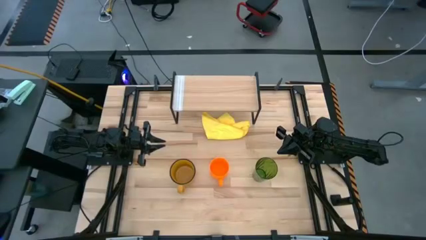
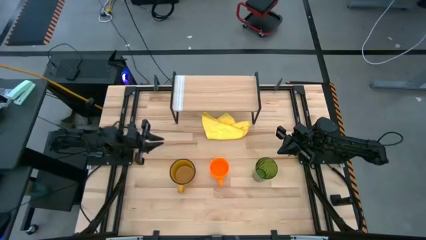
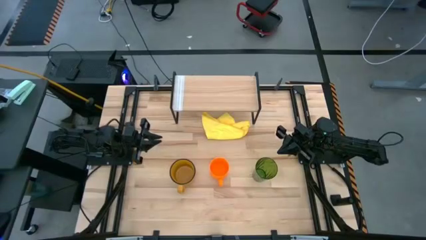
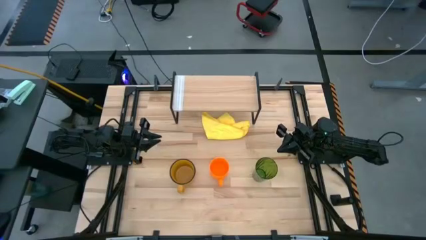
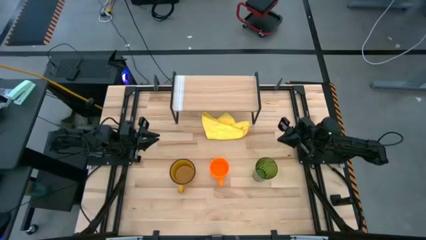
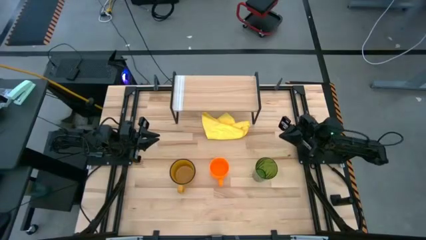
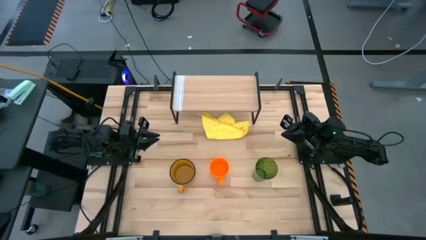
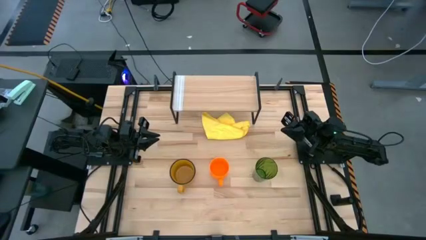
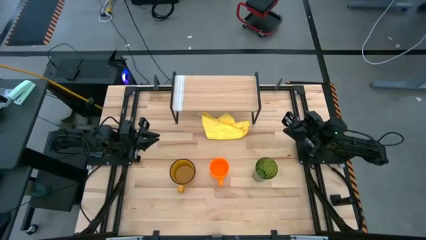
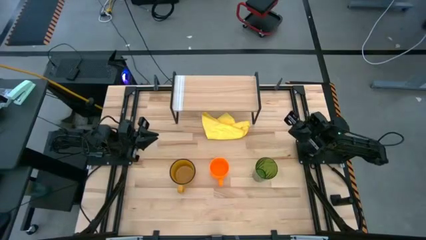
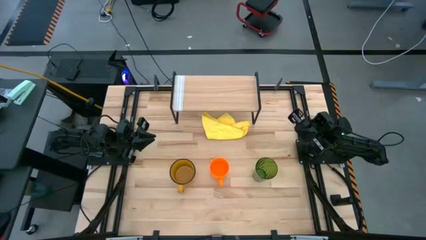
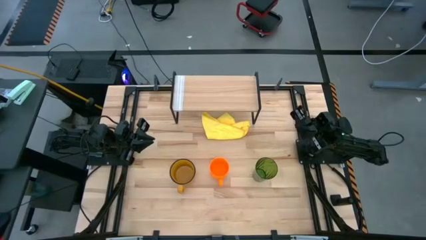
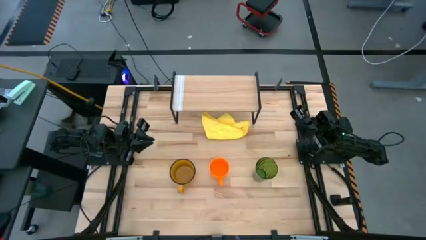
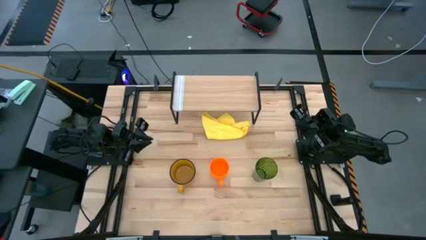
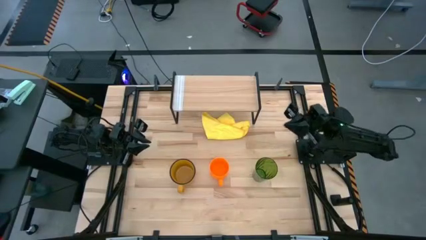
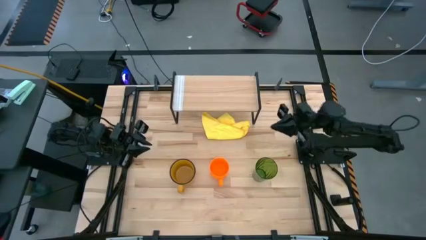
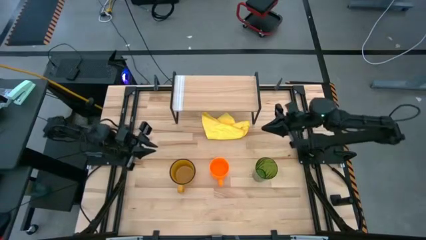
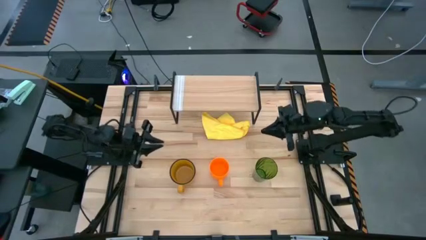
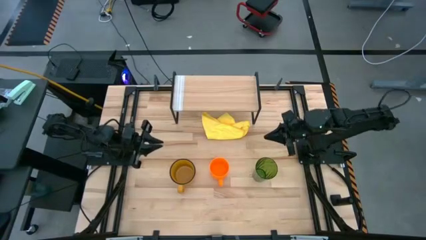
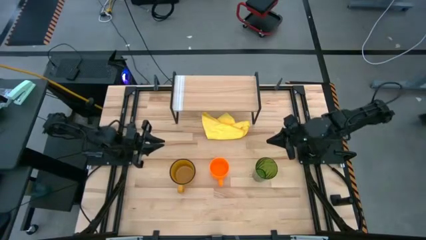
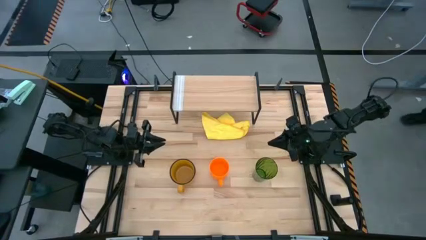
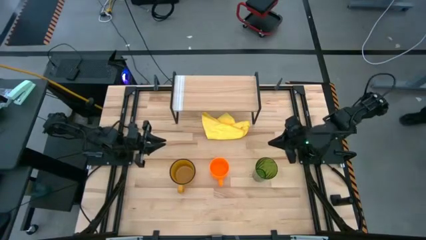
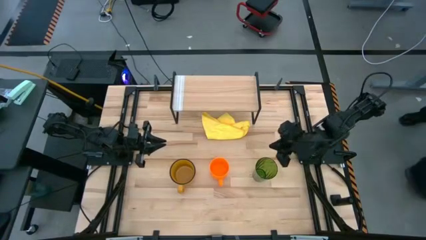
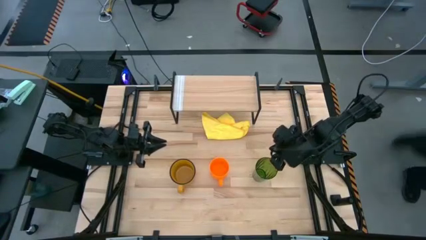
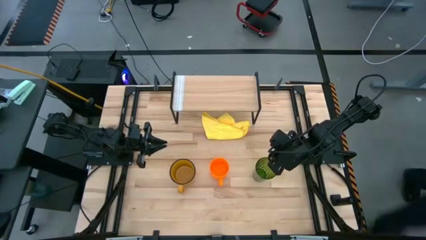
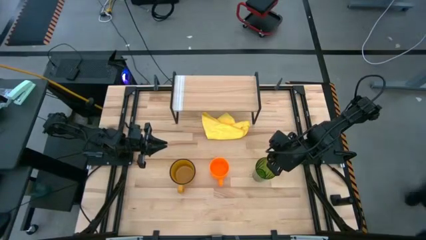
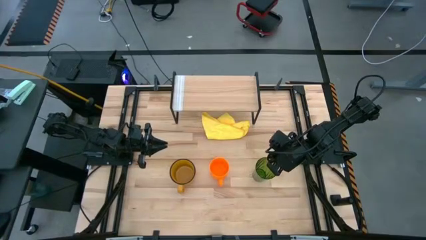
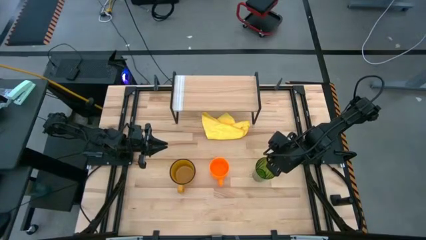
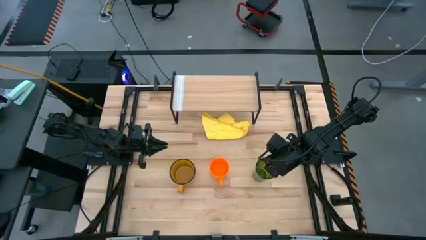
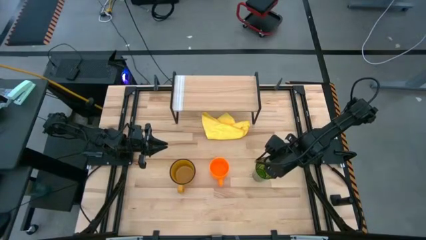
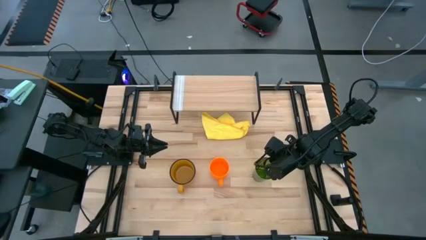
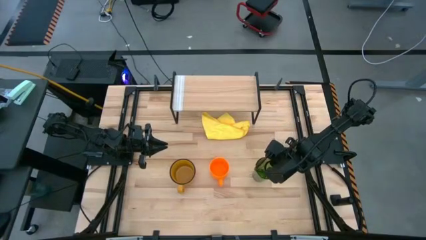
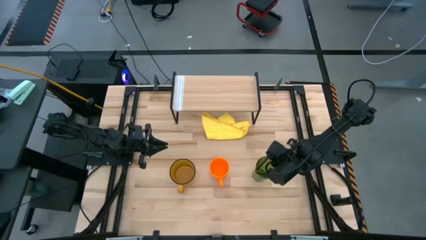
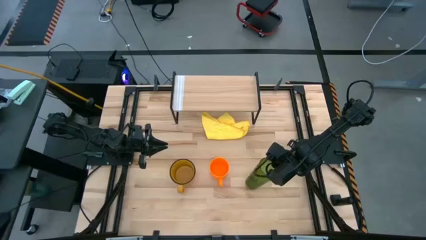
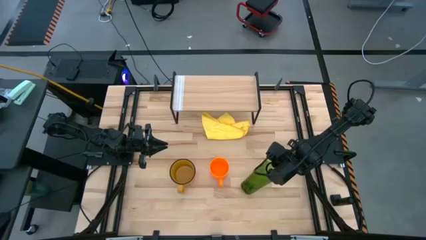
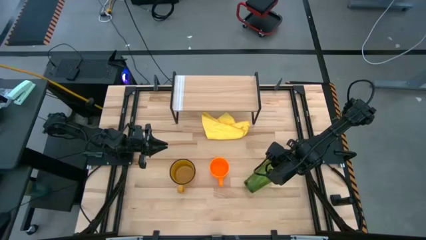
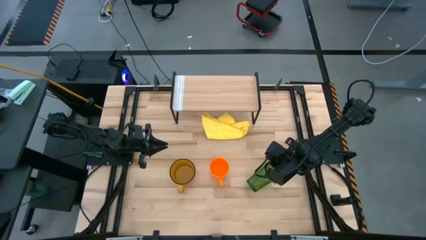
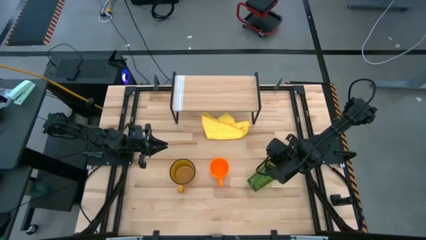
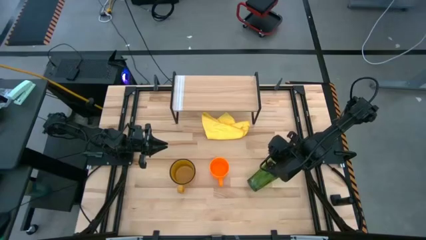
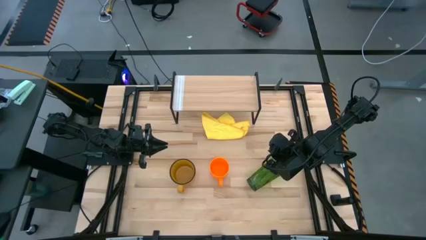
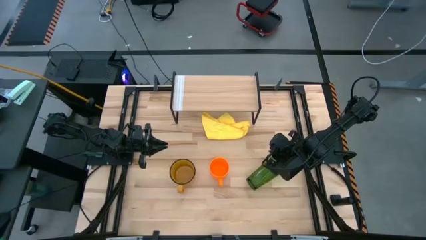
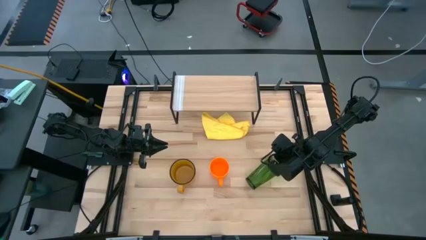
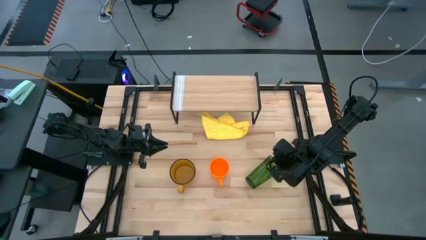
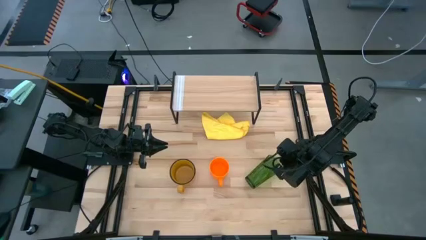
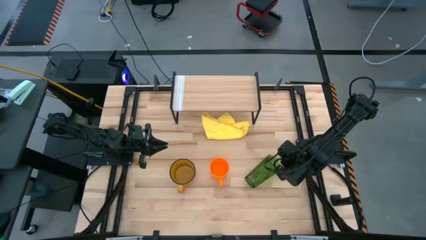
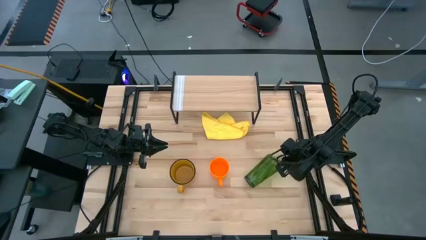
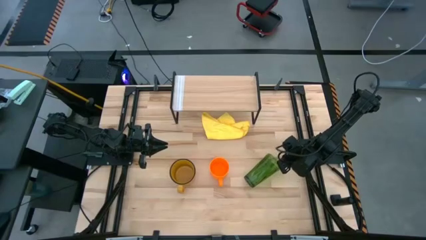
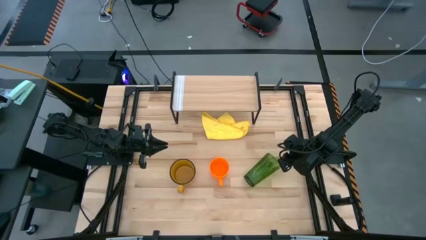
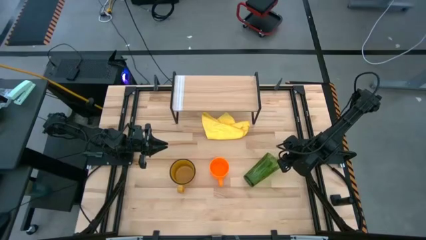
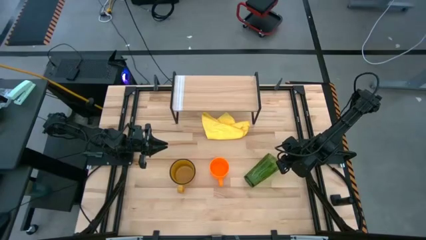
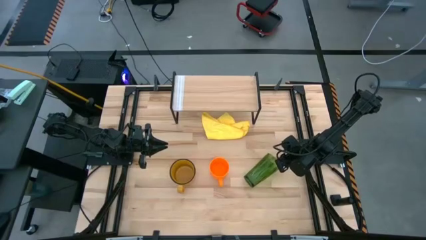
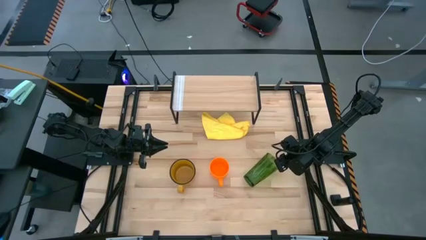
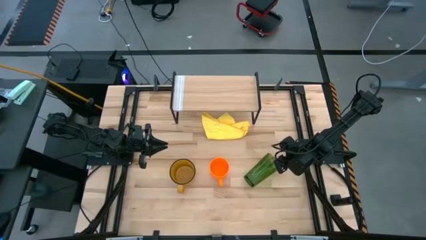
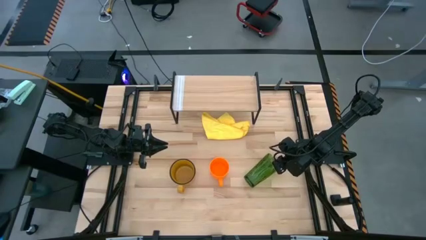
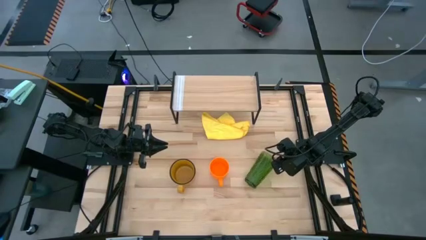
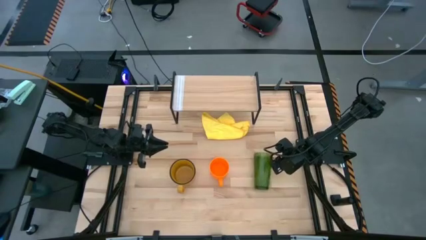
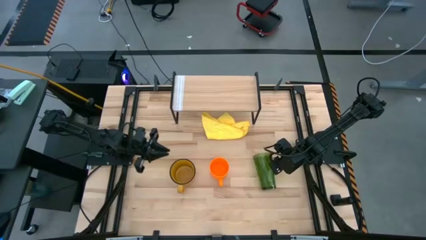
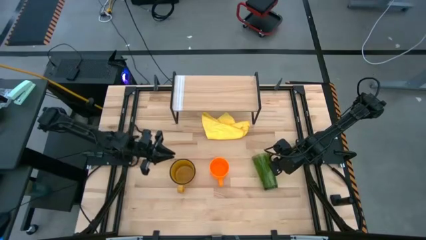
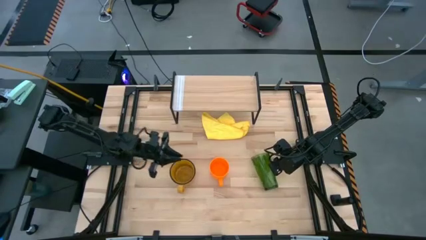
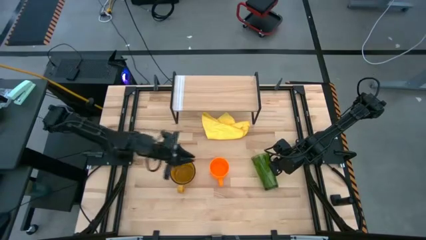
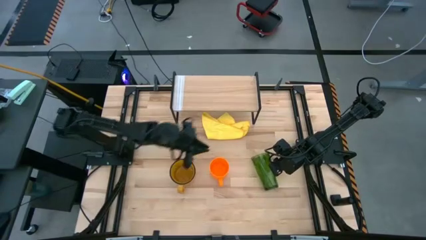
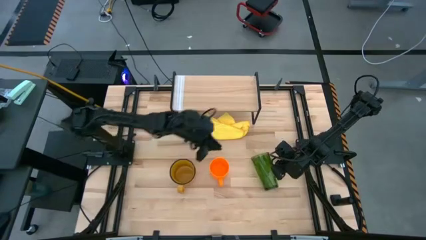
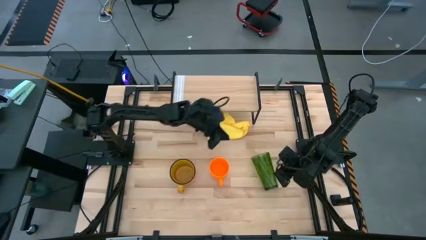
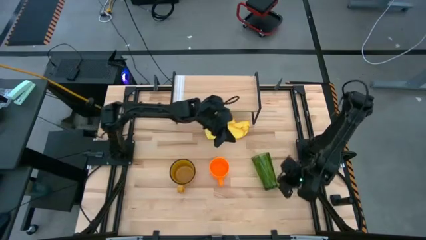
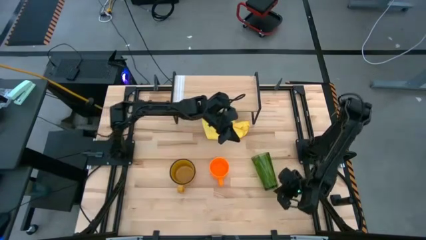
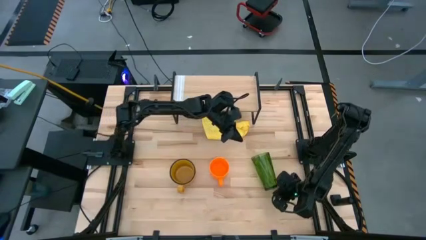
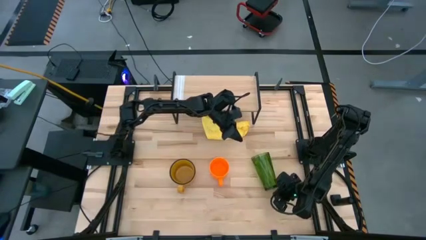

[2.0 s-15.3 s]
Task: Stack small to large cups/mugs on shelf
Put the green cup on the shelf
